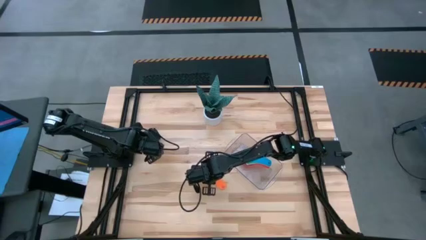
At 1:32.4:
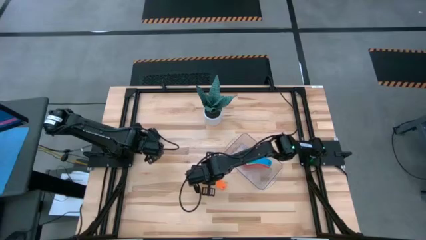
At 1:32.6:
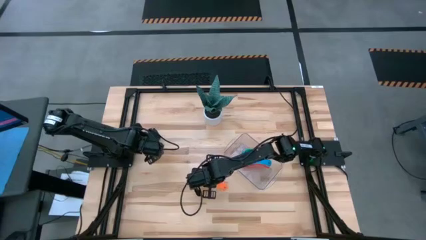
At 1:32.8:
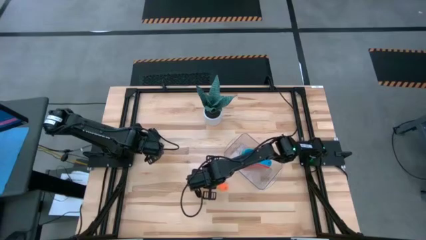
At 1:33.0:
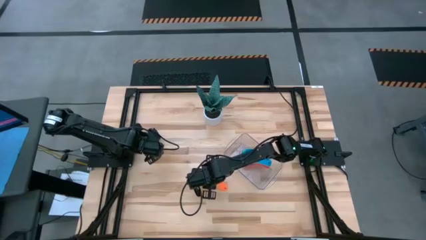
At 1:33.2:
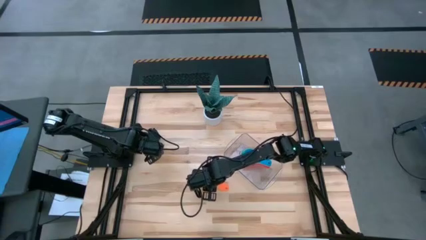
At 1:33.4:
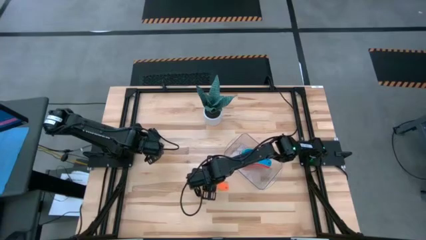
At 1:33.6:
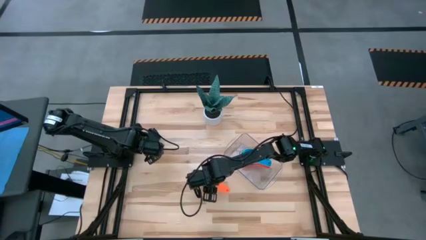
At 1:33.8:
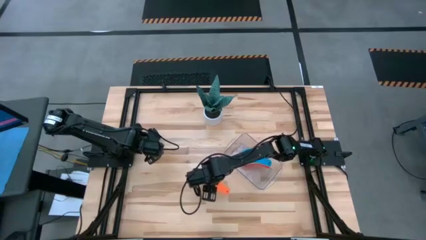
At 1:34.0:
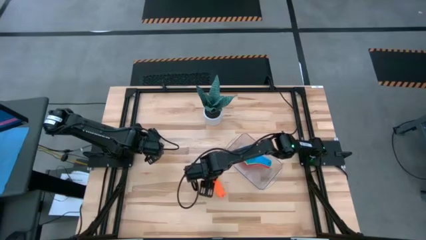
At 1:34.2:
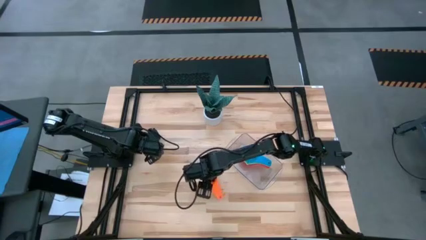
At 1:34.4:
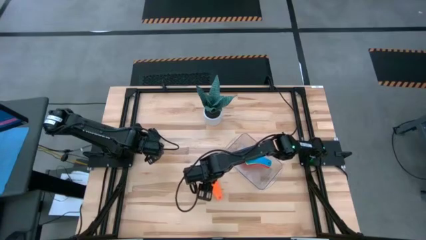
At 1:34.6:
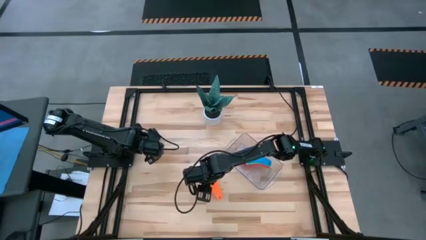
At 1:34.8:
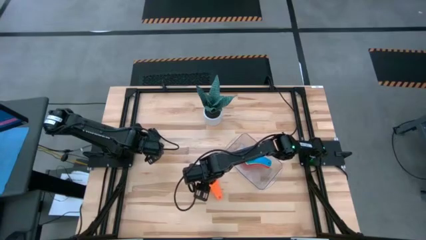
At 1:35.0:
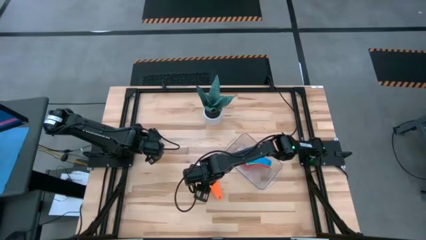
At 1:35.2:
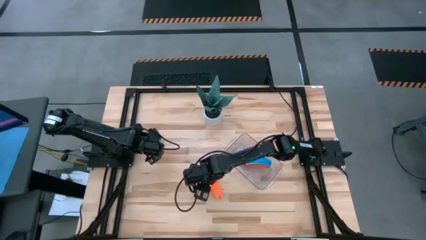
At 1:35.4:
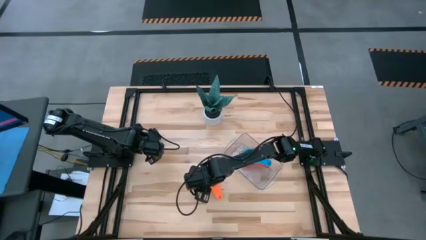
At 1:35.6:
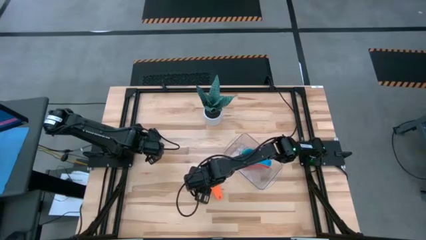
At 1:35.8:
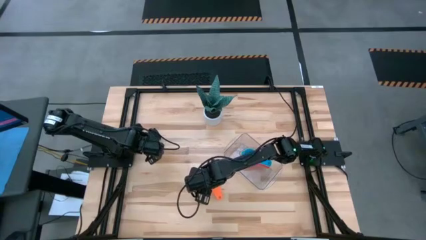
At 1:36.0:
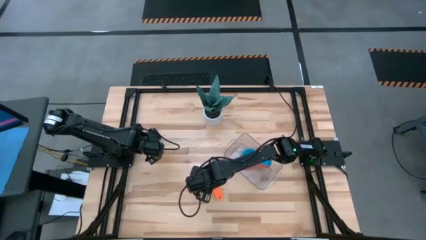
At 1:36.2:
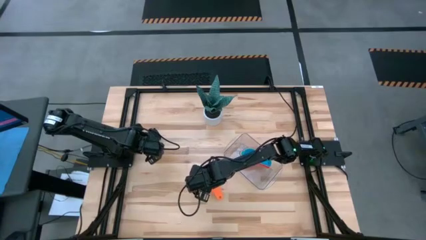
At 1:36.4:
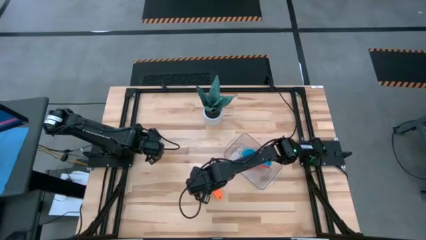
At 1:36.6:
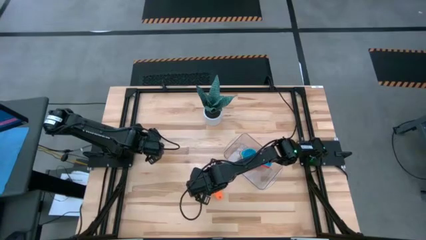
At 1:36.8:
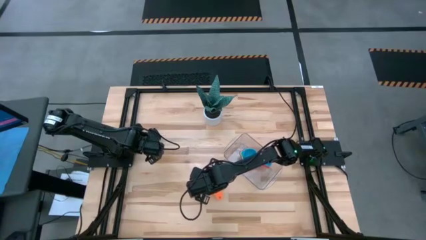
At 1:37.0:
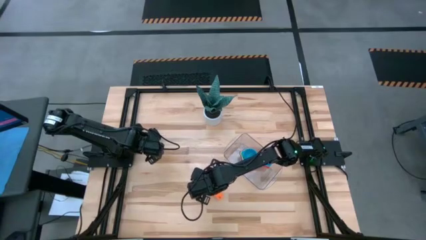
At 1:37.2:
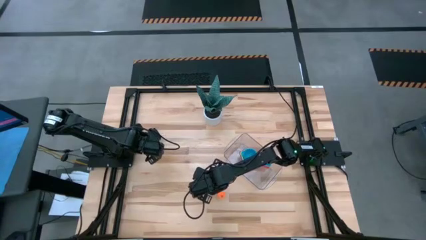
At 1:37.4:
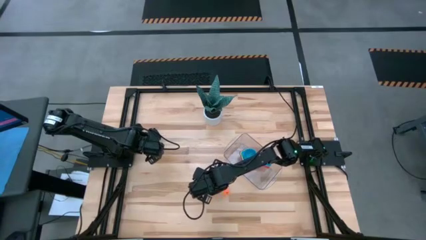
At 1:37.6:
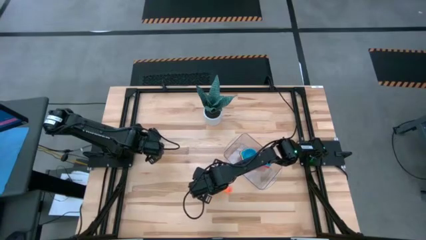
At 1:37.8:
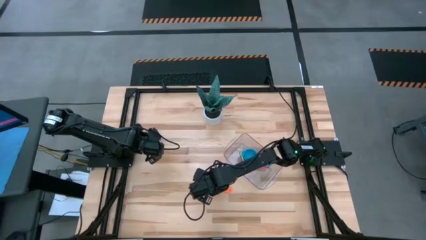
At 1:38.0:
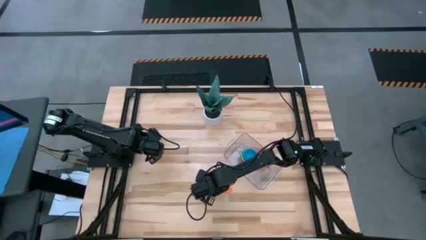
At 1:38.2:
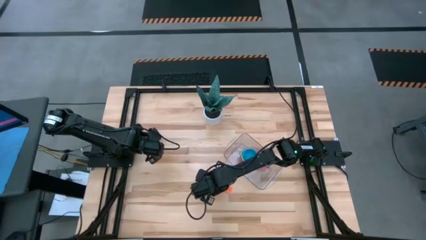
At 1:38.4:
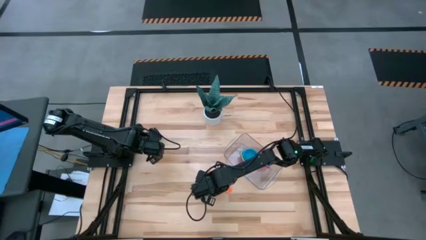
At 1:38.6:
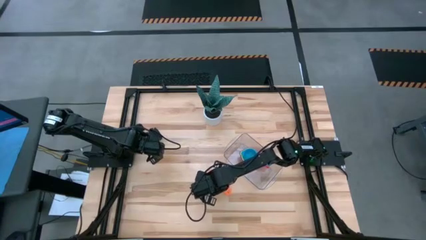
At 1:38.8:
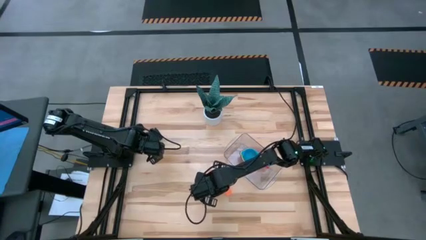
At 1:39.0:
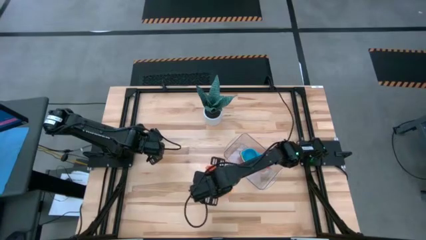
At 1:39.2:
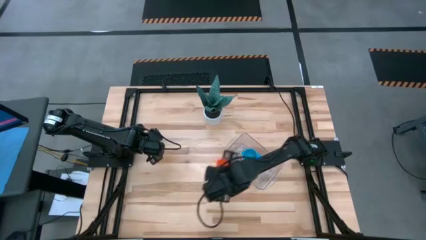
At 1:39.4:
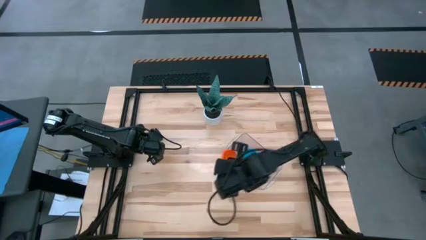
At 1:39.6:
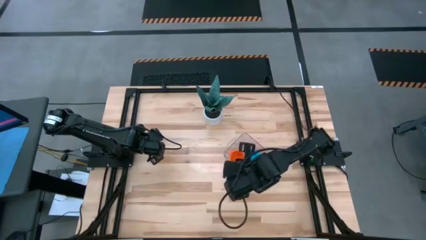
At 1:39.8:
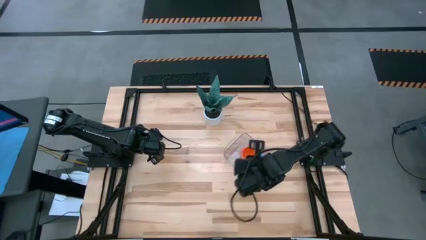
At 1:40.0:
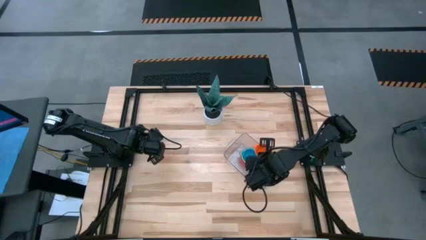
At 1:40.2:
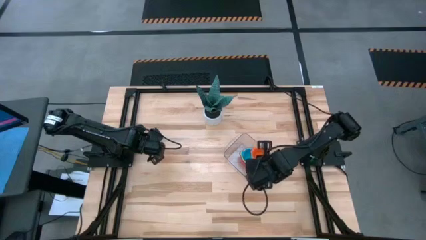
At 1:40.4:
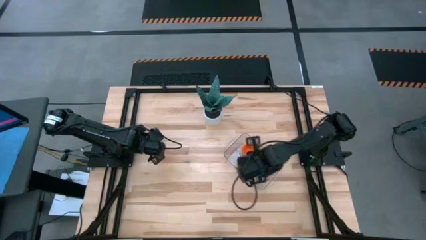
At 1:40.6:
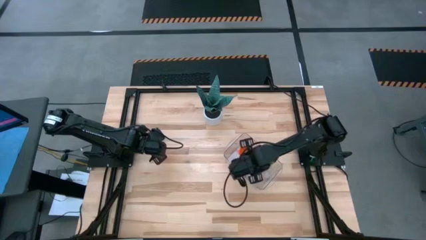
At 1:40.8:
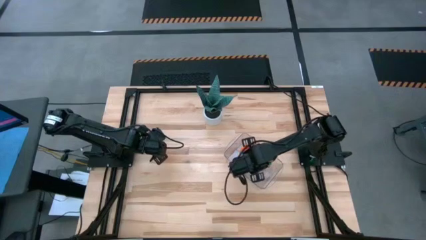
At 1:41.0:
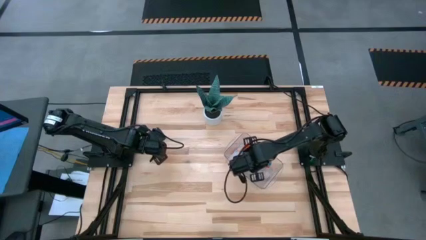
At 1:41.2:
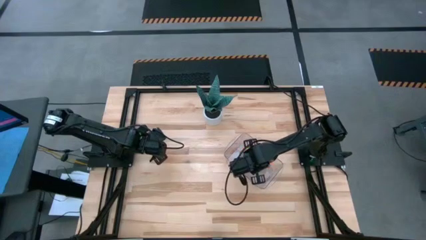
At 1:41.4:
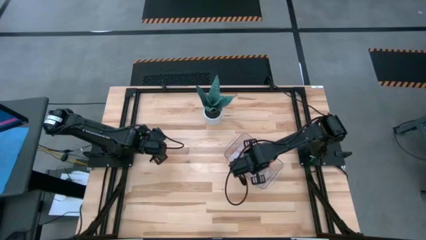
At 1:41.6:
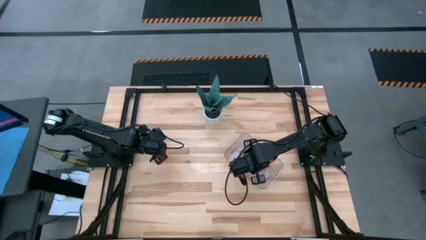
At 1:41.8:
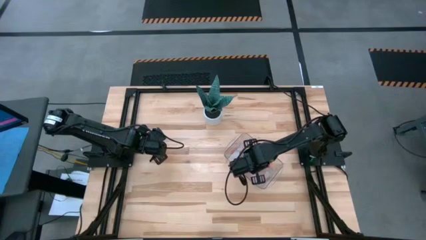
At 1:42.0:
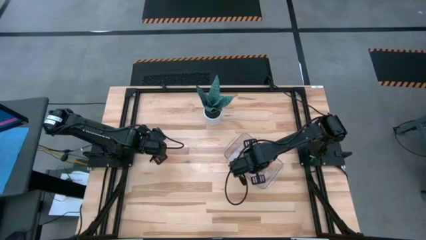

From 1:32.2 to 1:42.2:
Task: Nest measuring cups in basket
Stack the orange measuring cup on top of the light blue measuring cup
